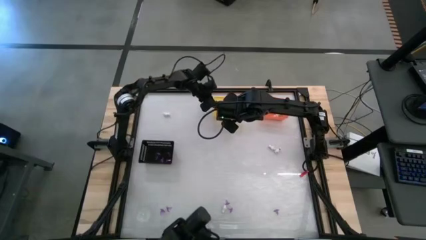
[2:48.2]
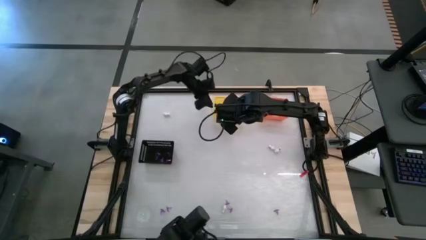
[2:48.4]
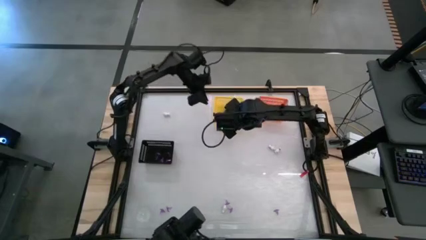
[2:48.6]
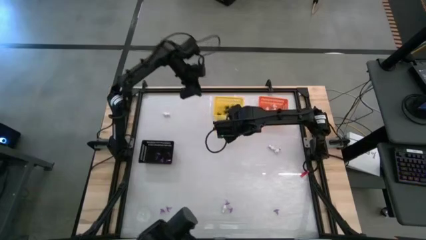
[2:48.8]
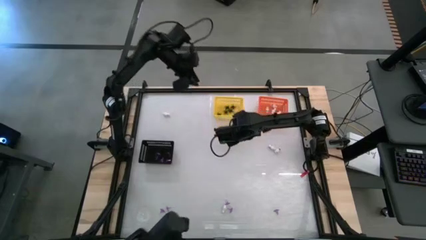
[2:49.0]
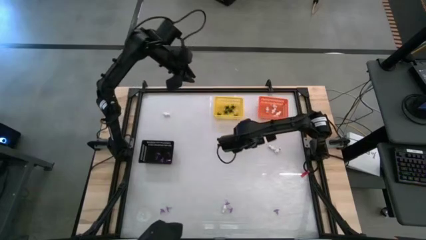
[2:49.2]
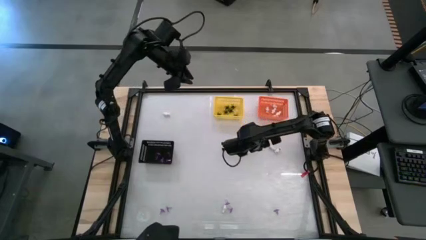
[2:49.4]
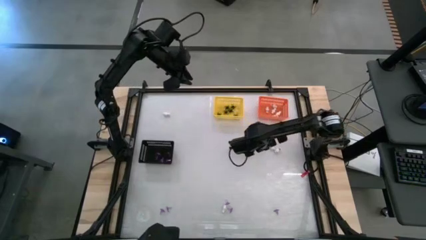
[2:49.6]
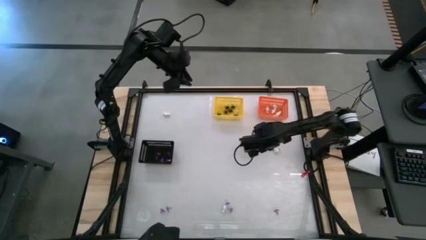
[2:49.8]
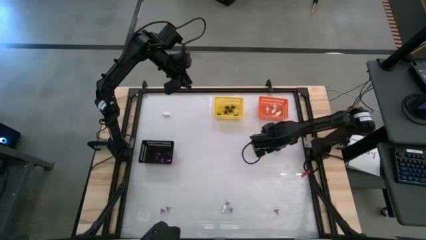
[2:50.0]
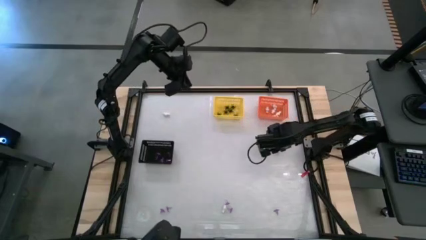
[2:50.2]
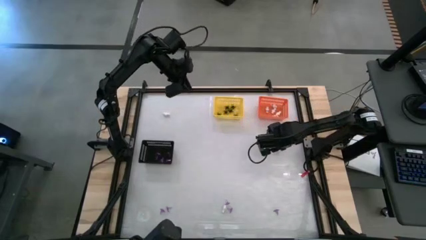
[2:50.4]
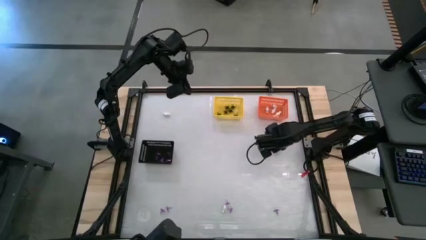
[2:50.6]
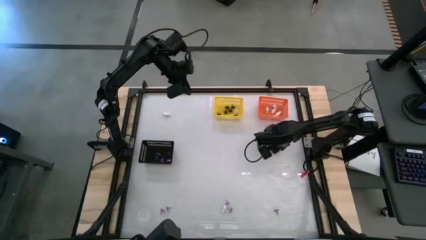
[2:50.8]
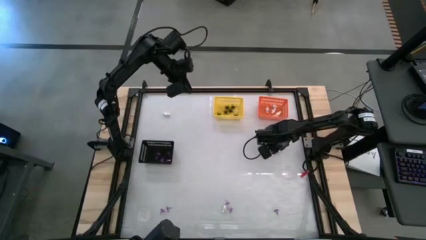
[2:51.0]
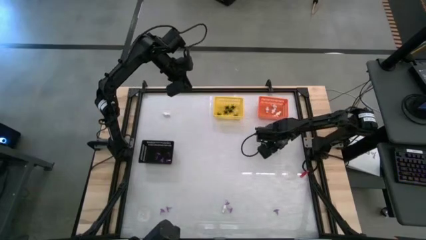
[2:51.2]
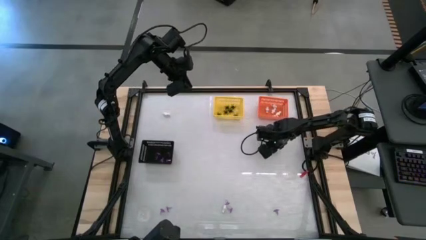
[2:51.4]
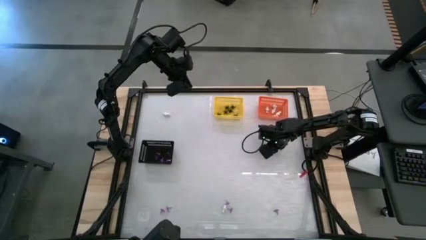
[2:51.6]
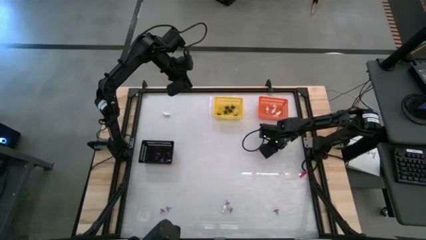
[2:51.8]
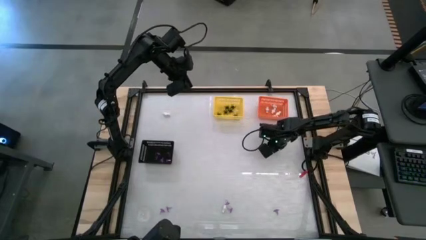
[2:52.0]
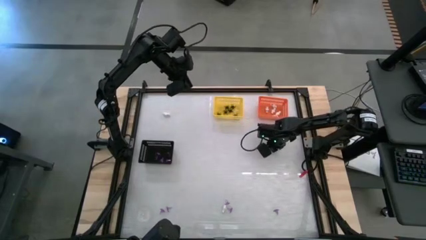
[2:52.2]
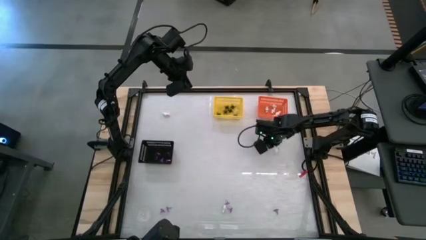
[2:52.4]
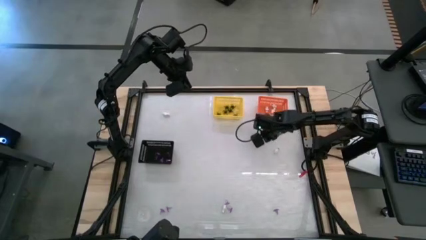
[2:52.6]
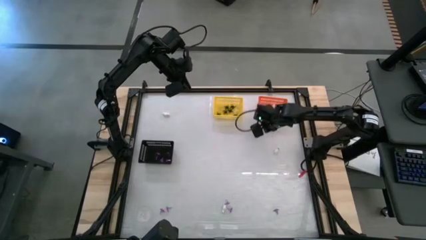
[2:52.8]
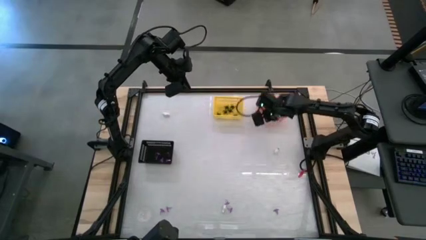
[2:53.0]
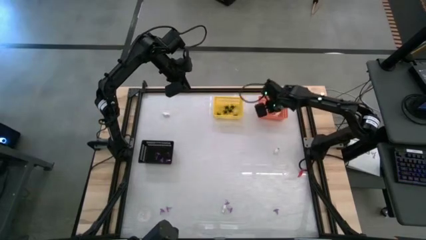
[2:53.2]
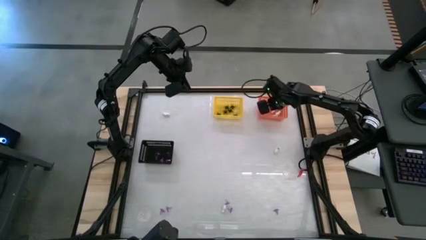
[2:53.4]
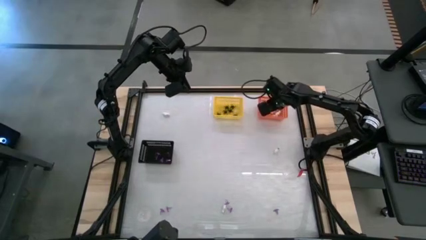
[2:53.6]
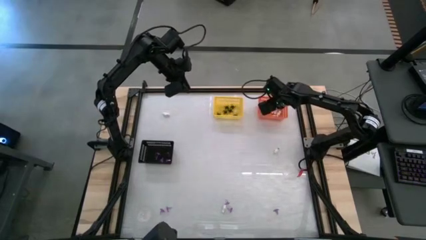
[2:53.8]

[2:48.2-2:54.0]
Task: Sort Halloween decoration
Put the white skeleton toy into the orange bin

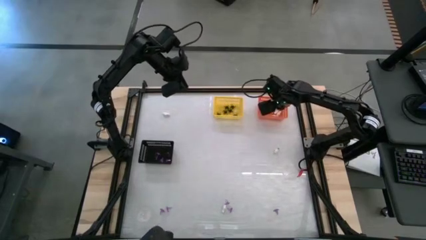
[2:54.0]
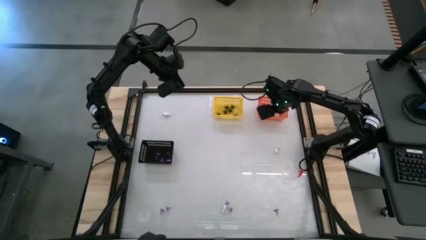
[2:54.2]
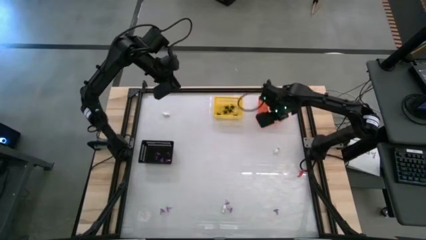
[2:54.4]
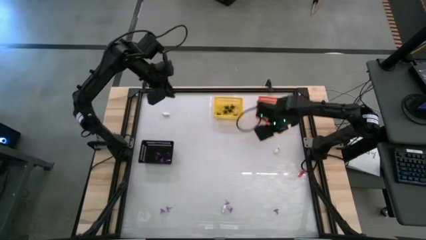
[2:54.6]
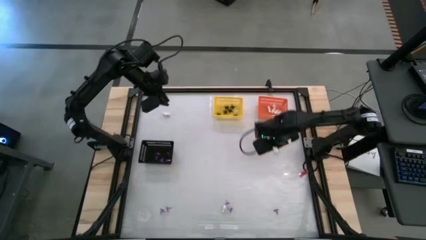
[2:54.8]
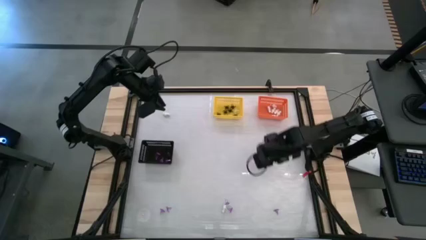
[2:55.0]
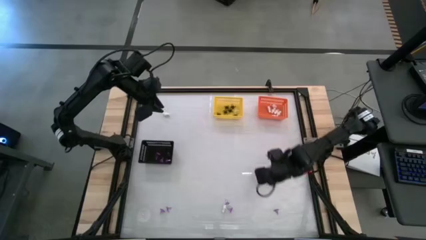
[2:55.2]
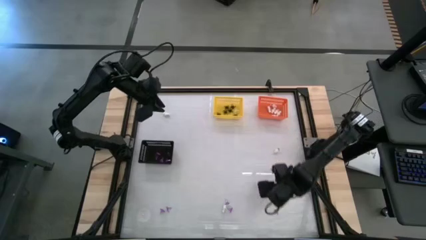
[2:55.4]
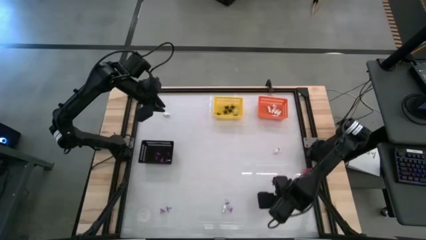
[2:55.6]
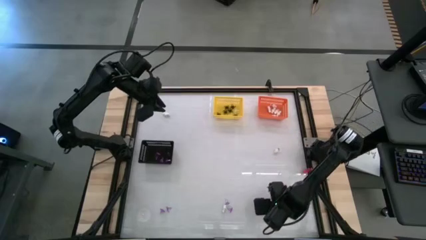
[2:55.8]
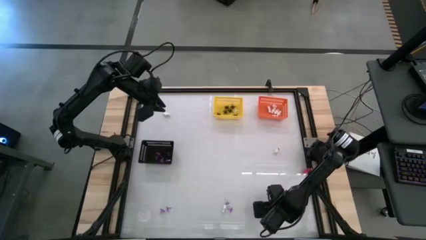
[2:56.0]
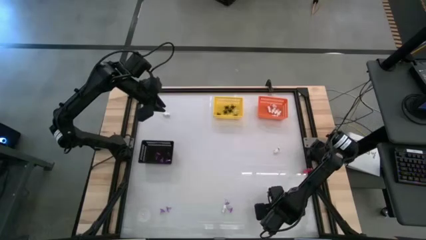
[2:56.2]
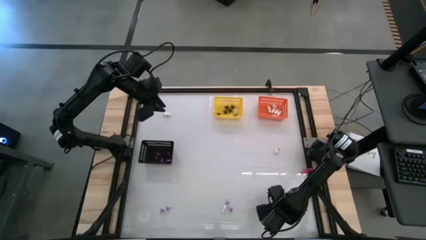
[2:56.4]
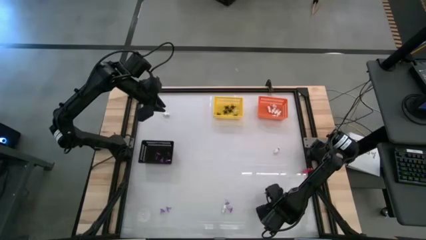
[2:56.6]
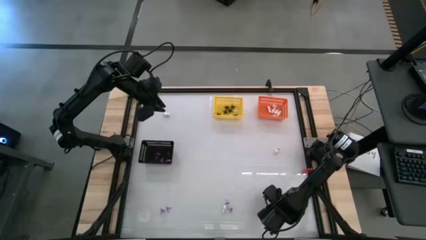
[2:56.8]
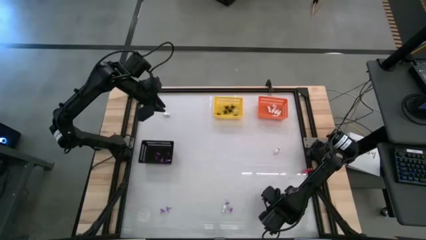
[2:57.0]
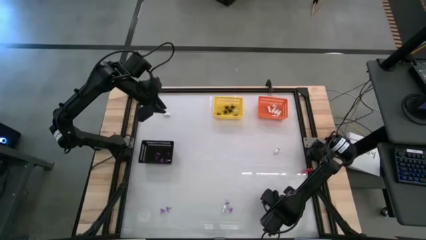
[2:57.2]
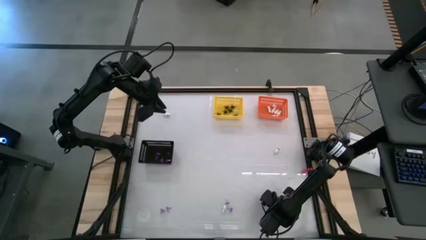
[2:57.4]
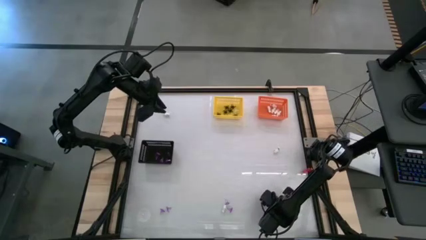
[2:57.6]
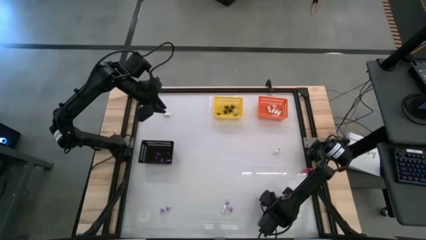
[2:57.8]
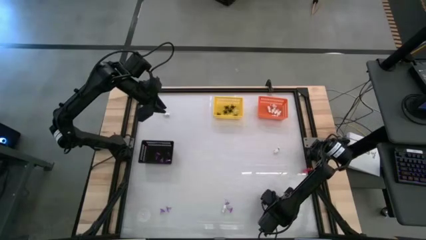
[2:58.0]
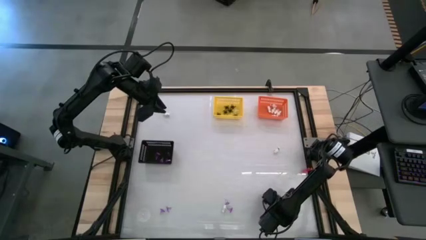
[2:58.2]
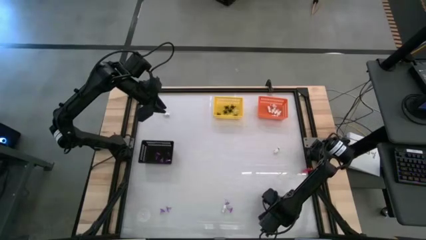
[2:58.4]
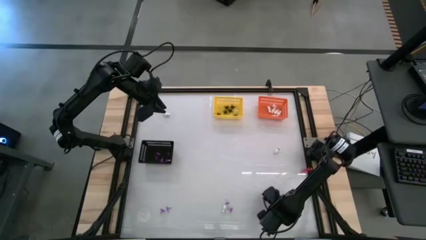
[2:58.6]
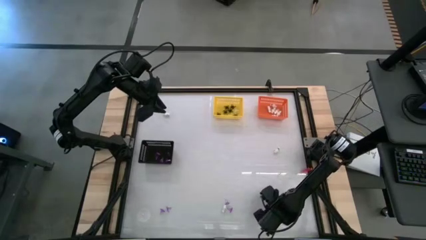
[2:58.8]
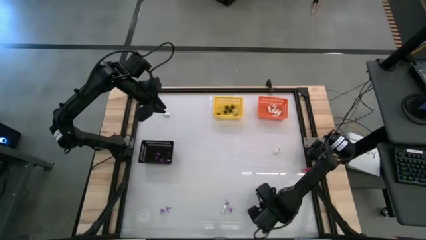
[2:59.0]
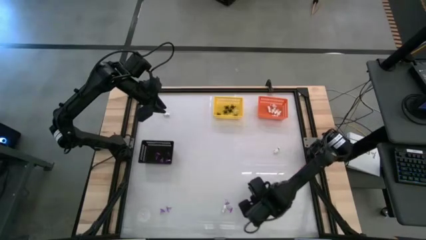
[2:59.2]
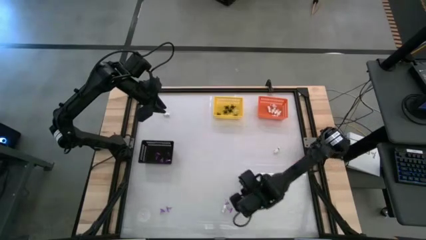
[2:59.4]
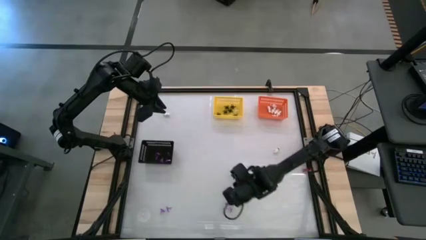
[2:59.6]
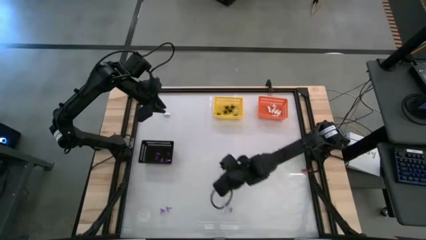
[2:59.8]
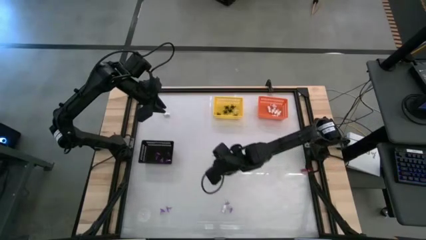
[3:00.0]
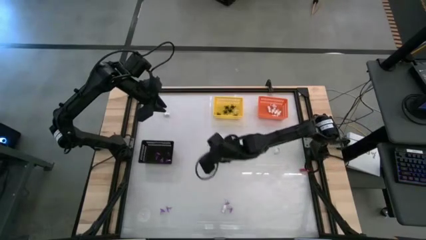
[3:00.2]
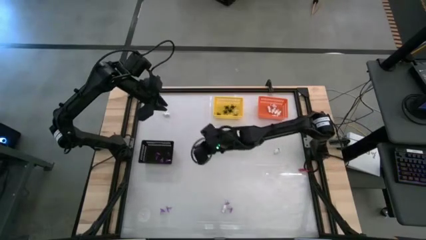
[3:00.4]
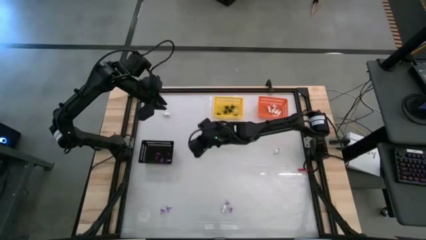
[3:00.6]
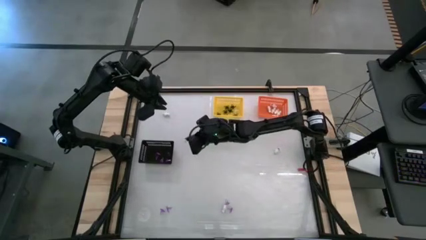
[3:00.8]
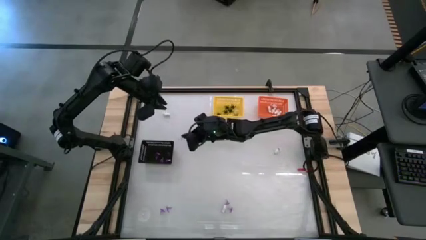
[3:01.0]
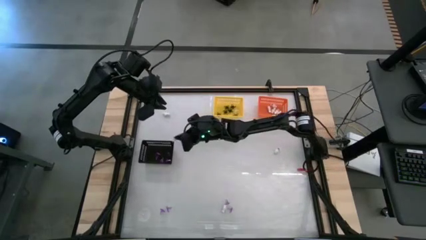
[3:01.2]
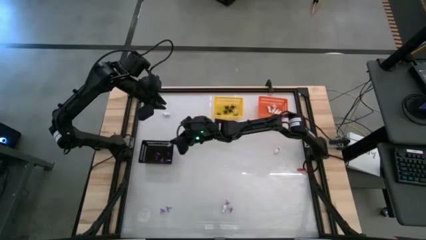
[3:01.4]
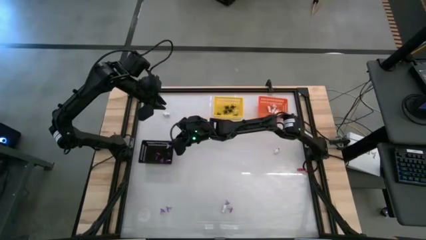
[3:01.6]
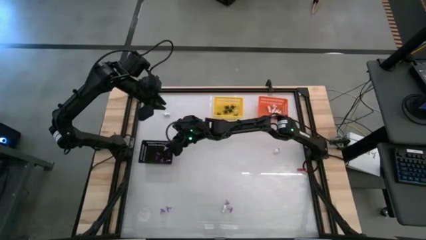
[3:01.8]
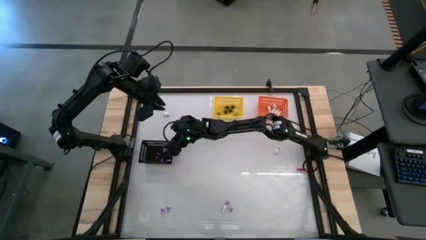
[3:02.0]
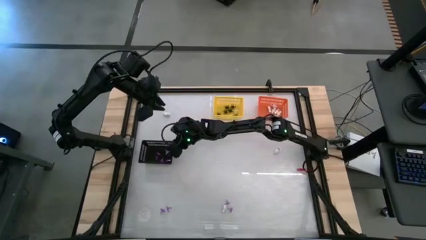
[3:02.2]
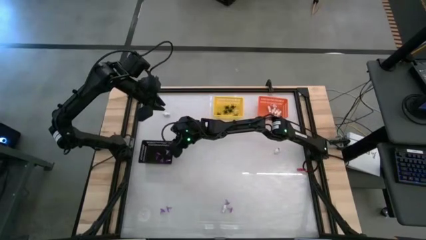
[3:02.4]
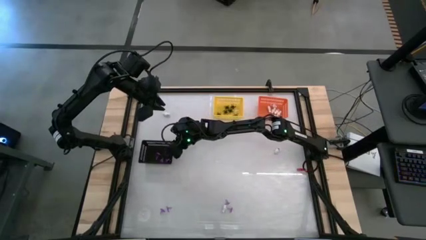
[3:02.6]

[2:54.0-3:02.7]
Put the purple witch hat toy into the black bin

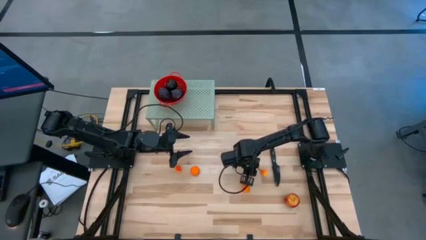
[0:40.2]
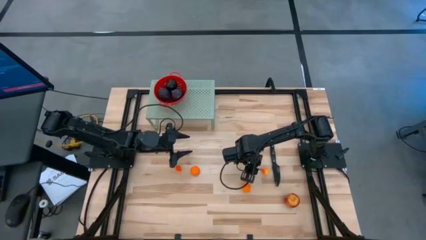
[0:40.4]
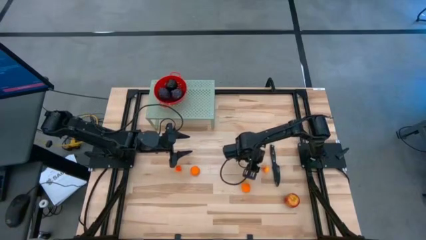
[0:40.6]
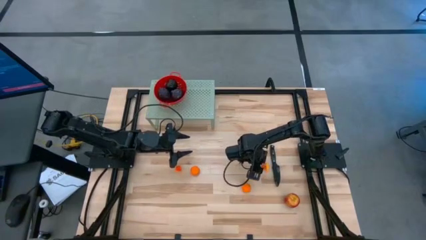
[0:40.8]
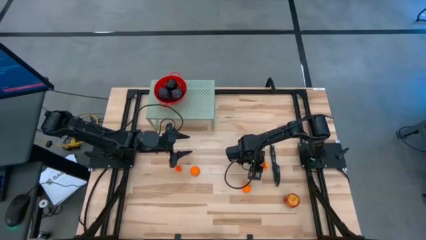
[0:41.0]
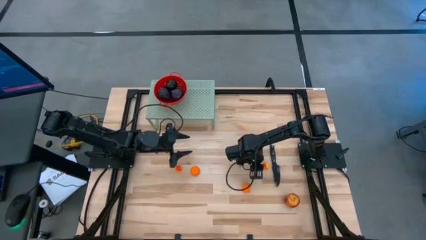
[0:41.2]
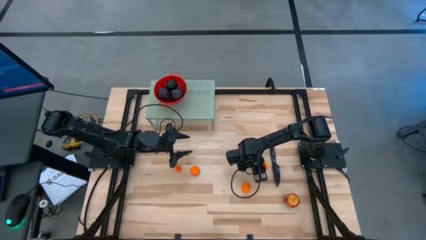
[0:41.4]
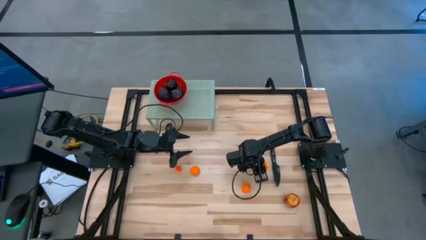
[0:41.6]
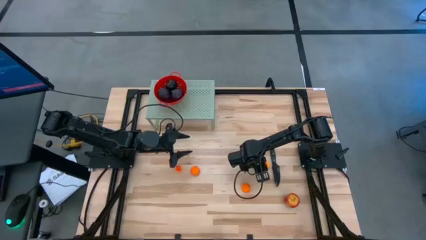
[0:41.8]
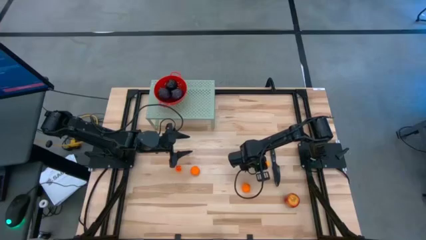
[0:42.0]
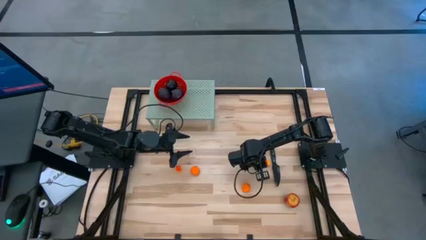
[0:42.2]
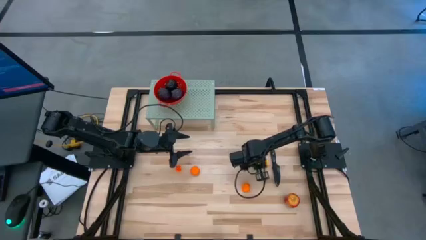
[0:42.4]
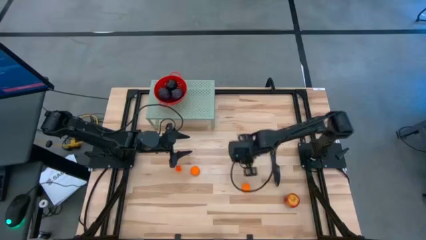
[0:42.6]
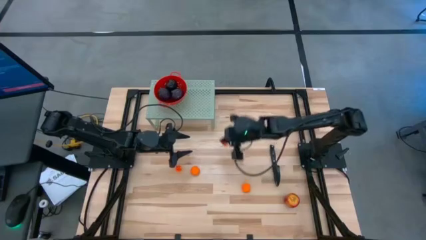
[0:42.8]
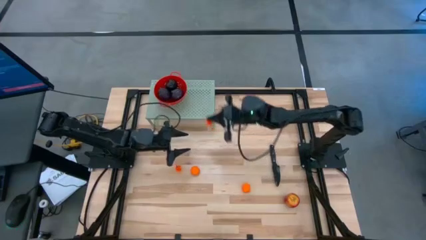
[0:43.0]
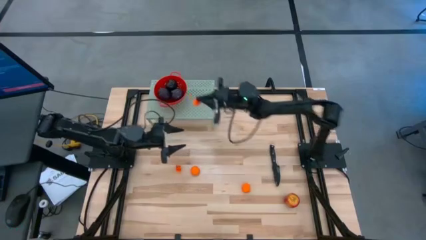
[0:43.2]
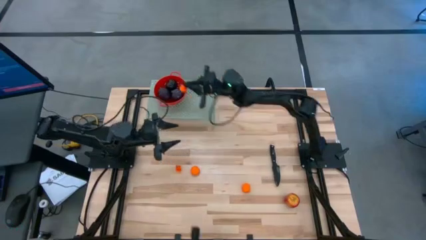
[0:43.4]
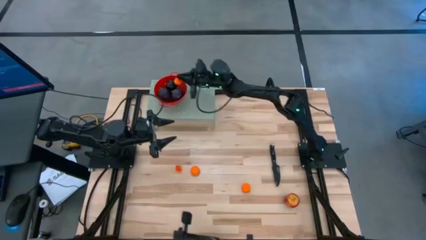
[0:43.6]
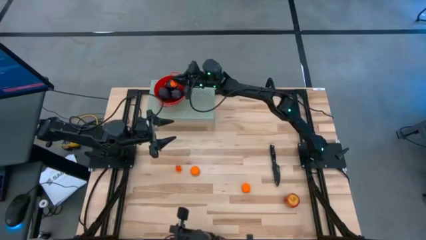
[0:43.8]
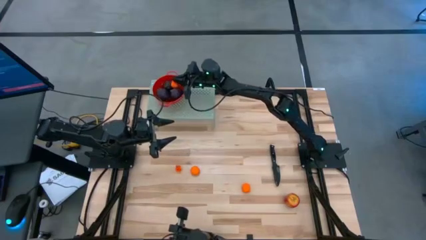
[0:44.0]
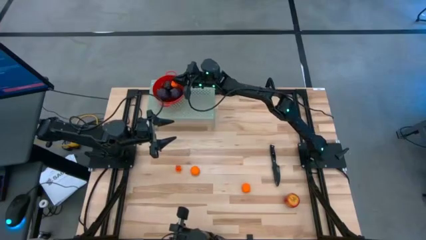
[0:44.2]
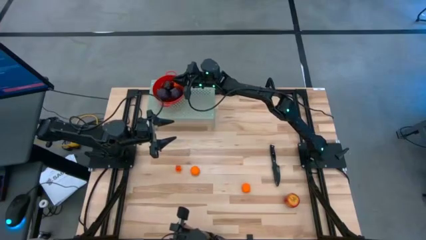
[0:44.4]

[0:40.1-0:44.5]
Task: Pick & Place Fruit
Put the right red and yellow pear into the red strainer bowl
